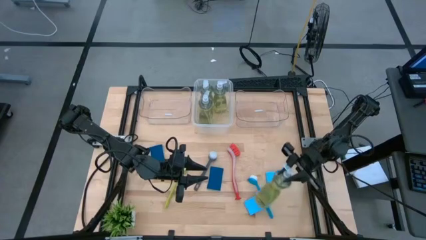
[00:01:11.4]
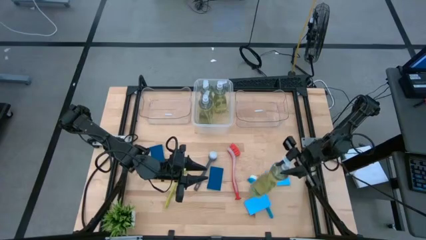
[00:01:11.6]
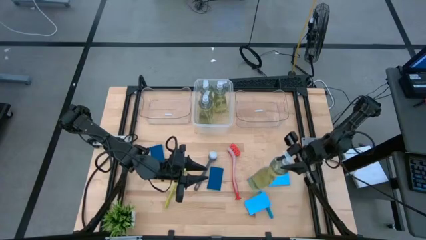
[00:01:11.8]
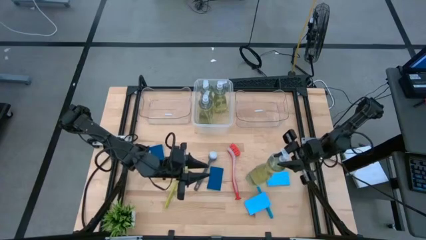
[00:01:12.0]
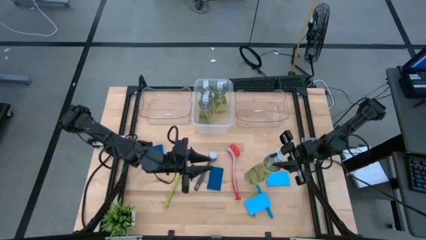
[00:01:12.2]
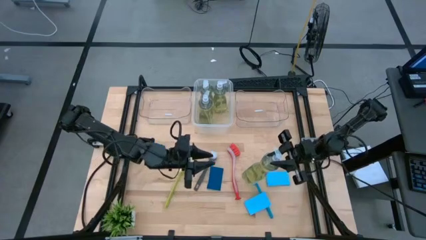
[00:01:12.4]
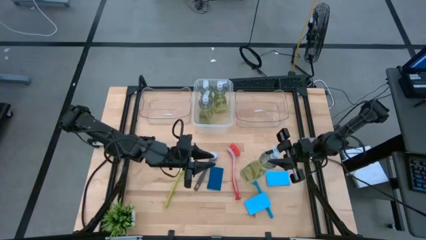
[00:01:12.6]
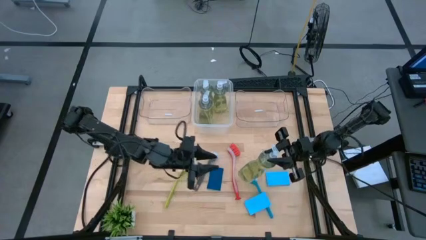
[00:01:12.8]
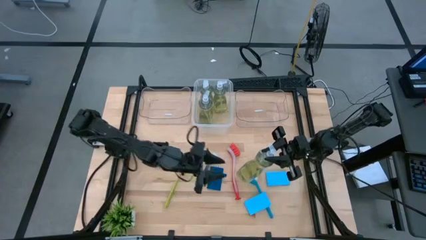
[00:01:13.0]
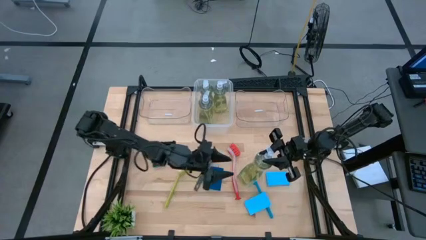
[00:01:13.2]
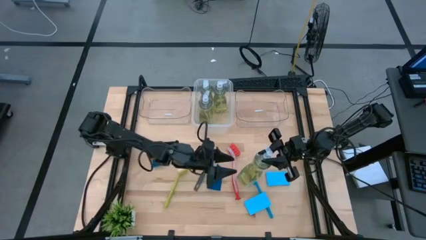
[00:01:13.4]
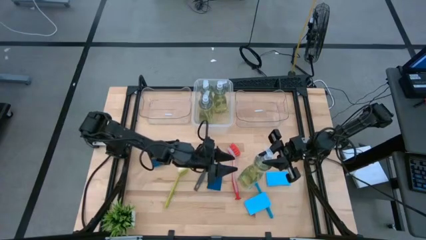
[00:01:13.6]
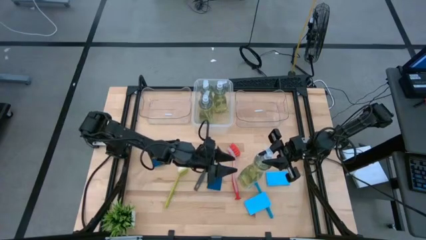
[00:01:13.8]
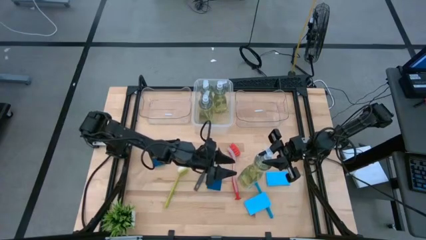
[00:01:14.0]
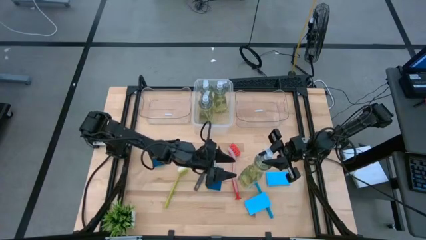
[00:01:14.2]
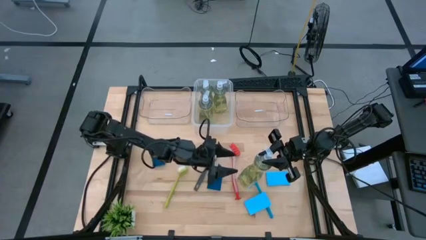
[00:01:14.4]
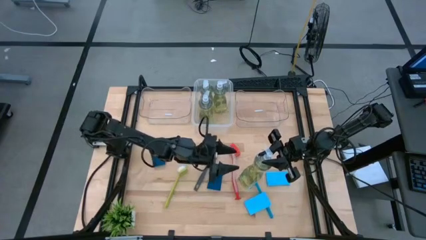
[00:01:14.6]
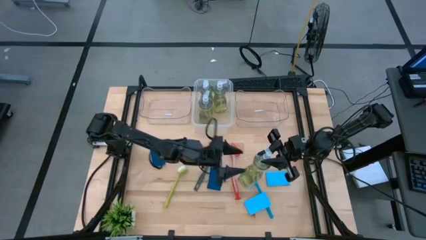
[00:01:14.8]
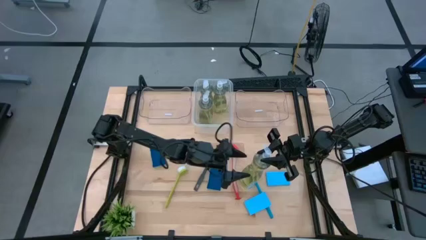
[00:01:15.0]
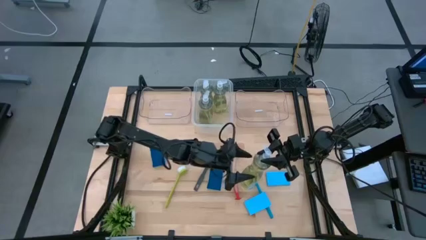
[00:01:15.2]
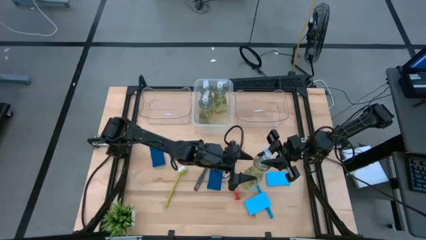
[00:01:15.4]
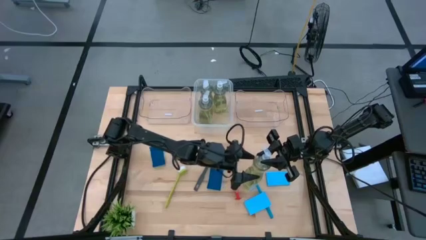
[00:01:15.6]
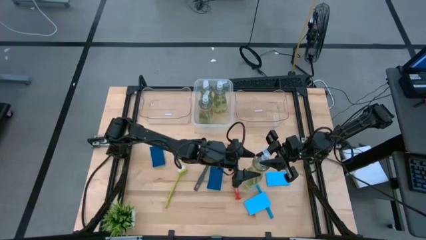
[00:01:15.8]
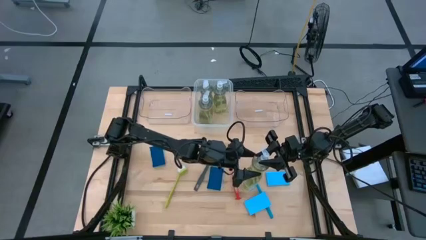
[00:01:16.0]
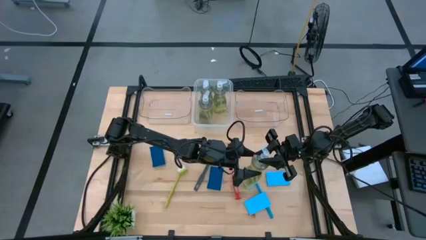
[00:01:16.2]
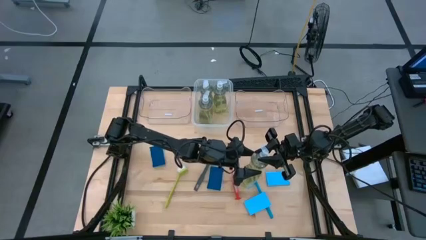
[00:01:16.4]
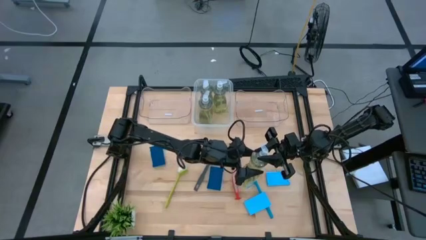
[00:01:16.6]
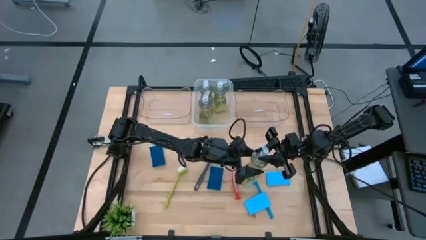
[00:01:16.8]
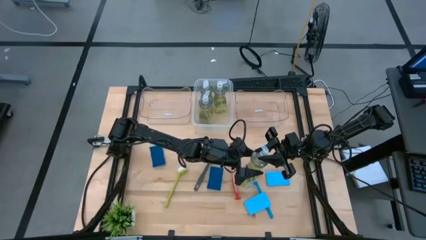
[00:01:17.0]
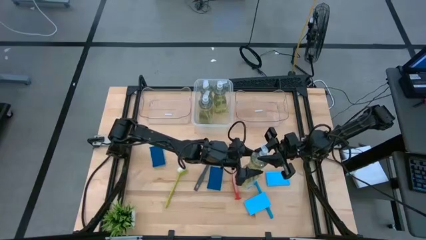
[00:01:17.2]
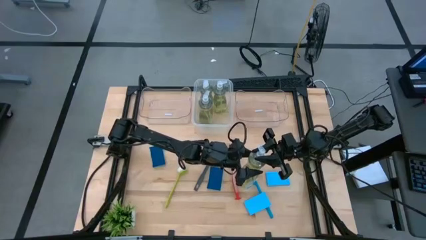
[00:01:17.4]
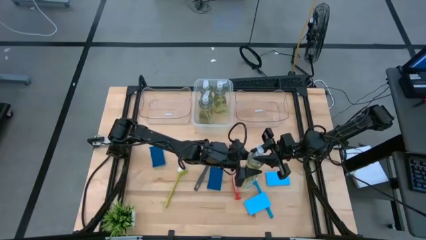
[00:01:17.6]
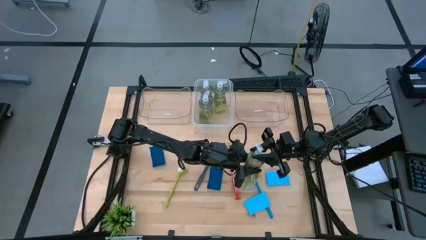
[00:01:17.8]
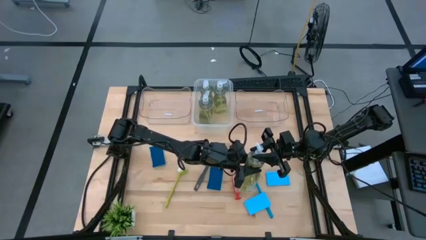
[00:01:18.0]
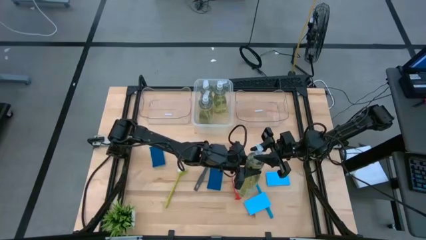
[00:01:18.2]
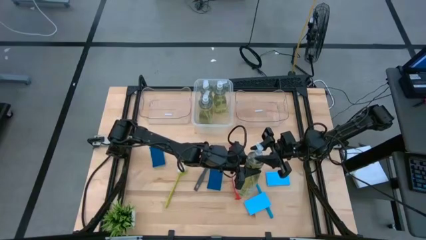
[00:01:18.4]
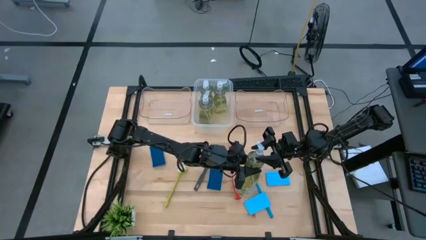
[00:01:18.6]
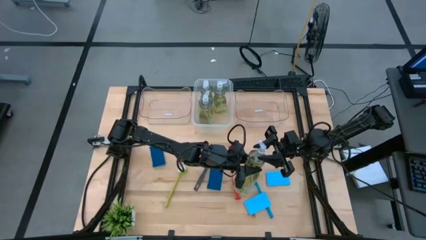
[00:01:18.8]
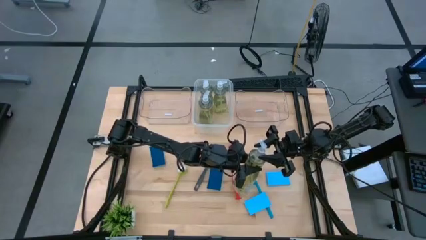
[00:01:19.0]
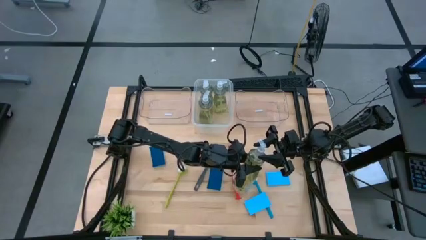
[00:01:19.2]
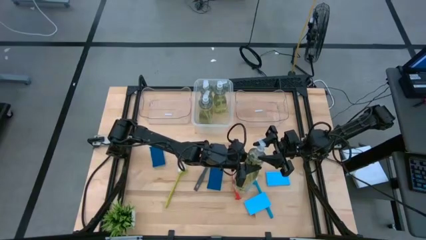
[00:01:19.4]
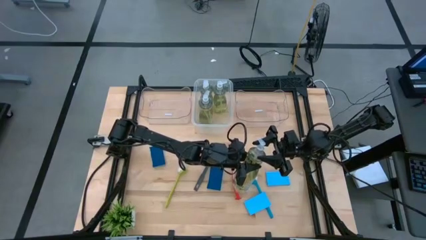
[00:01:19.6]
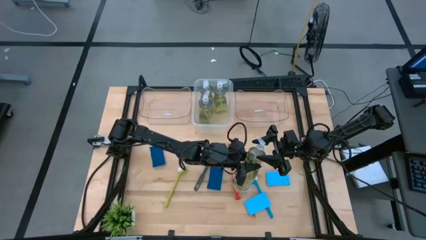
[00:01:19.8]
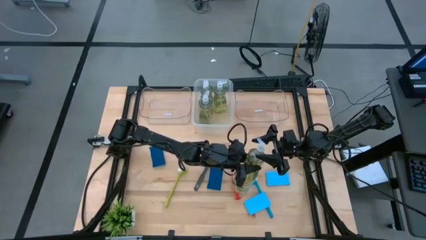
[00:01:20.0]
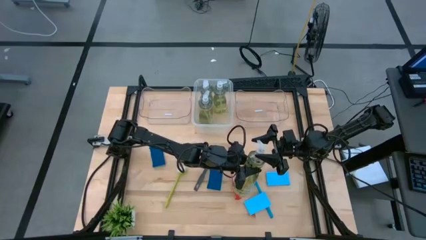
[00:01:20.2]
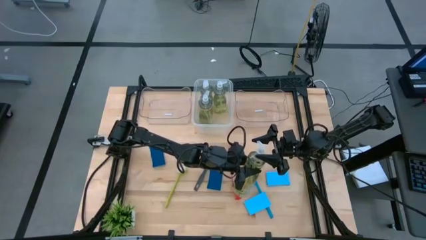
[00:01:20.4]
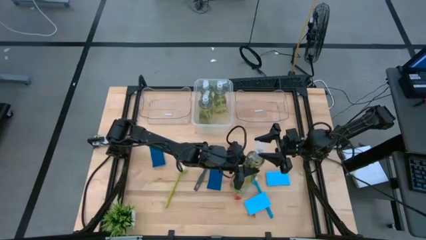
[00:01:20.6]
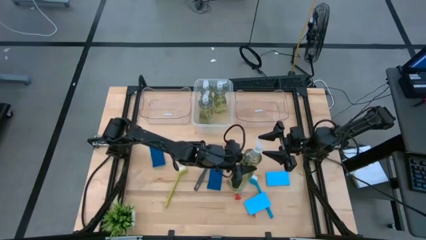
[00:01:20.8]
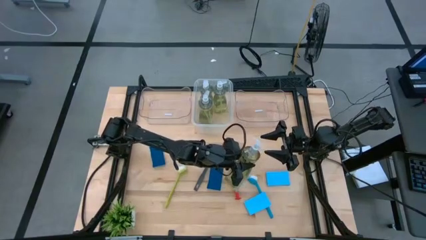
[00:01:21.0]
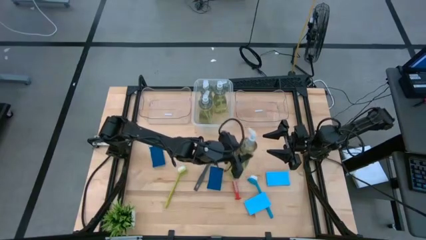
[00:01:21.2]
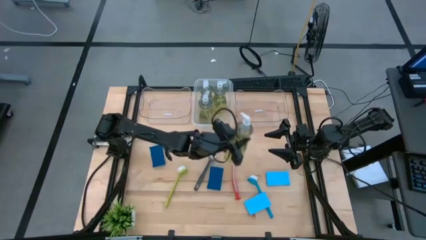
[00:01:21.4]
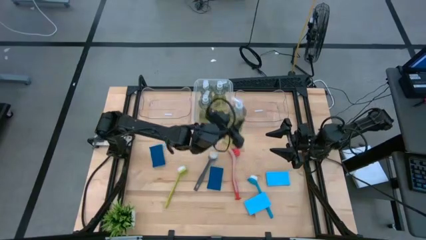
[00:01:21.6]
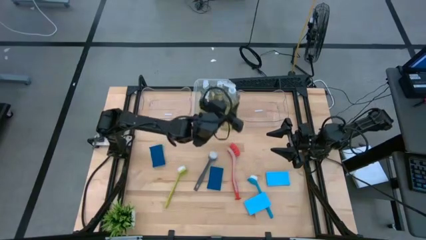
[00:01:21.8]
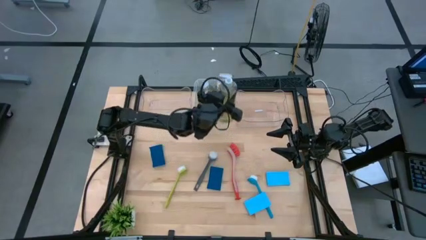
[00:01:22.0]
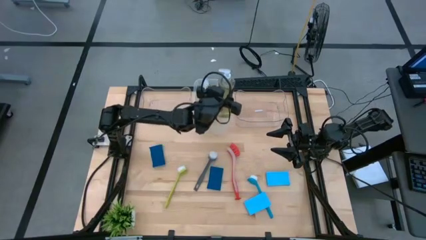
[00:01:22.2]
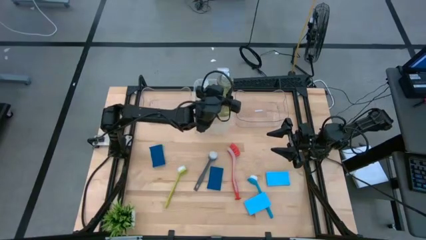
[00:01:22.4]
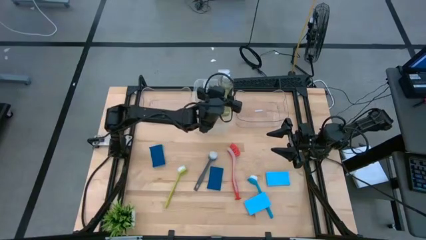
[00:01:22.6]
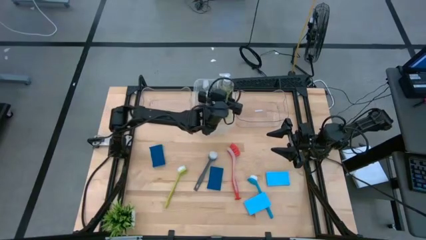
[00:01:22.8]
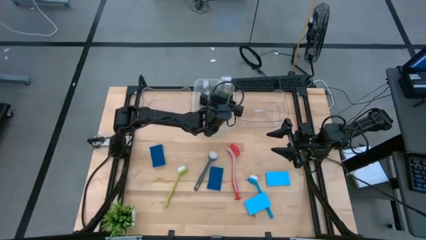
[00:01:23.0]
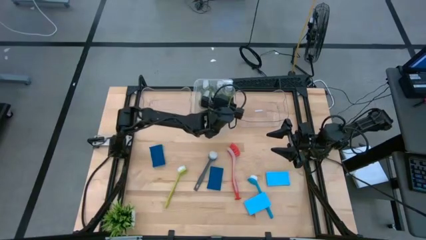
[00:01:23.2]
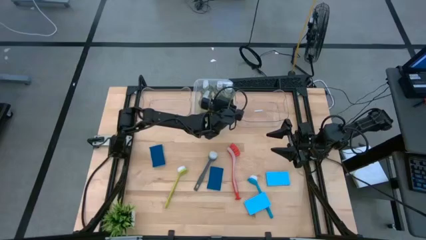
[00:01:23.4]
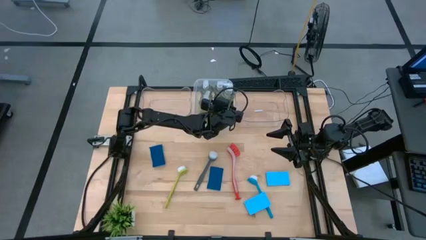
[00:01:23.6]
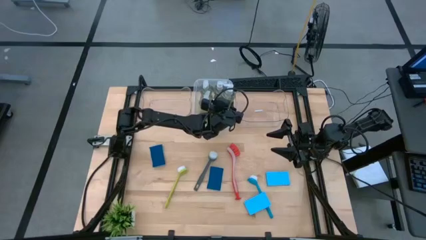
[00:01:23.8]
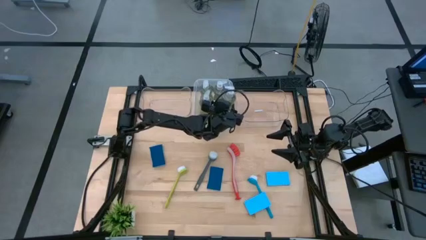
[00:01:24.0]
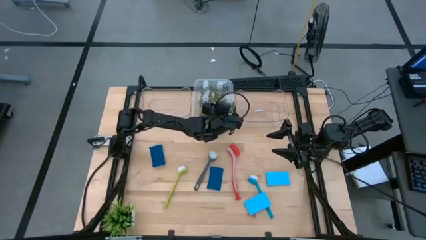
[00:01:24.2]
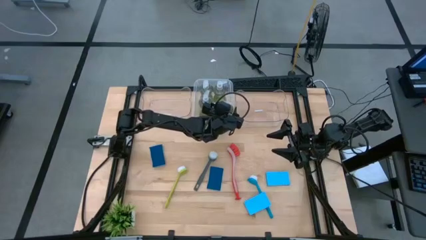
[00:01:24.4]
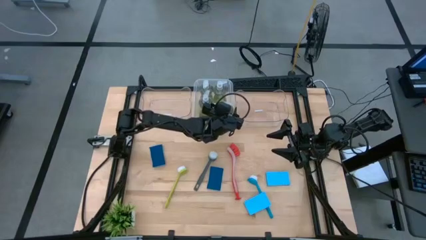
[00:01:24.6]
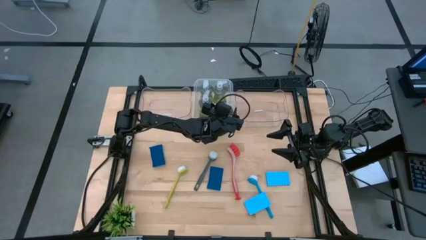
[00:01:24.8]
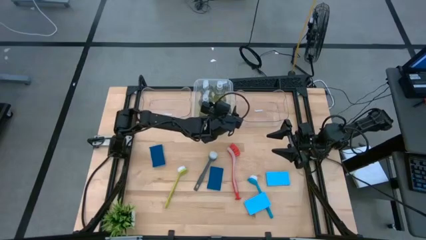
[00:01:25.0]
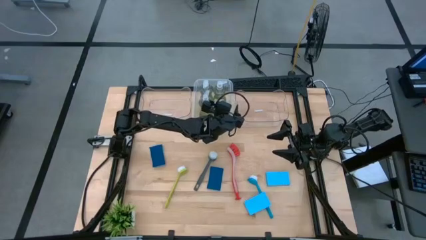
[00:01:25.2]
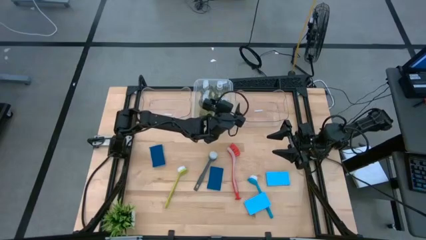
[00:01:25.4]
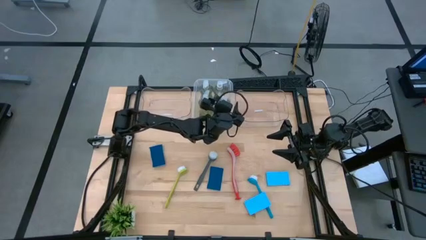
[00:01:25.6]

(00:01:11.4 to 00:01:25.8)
Task: Pick & Place Kitchen Sink Supplies
Put the green soap dispenser into the white transparent bin

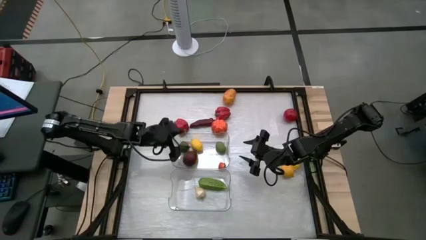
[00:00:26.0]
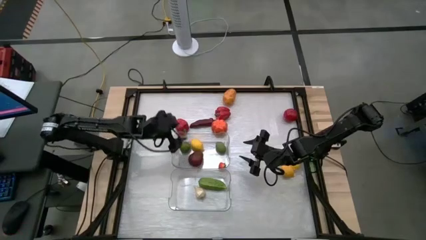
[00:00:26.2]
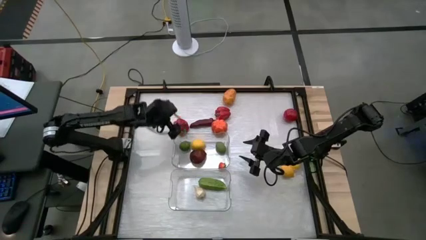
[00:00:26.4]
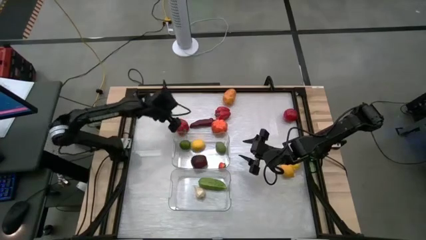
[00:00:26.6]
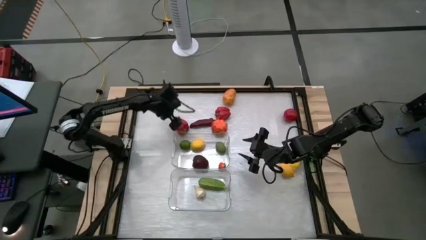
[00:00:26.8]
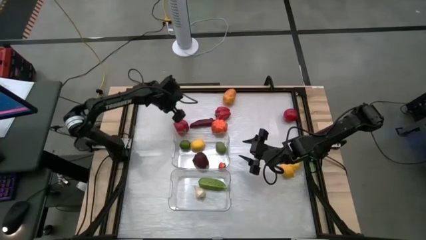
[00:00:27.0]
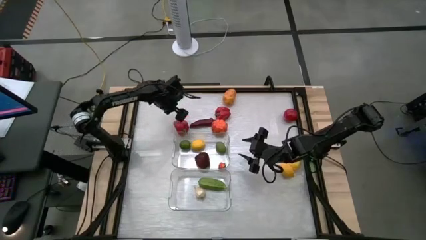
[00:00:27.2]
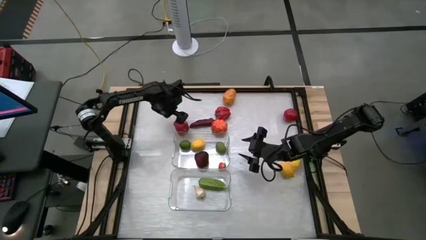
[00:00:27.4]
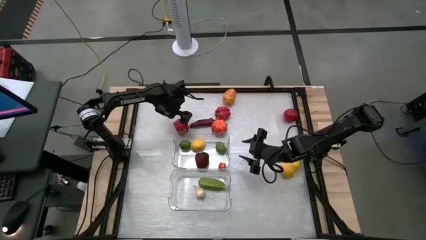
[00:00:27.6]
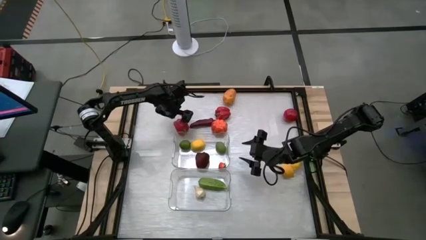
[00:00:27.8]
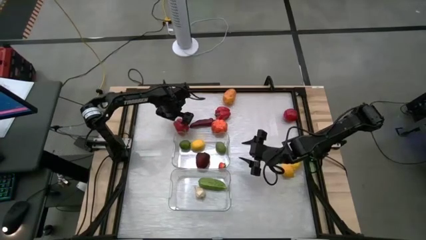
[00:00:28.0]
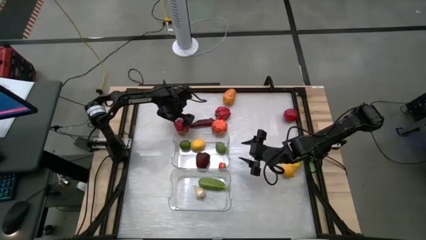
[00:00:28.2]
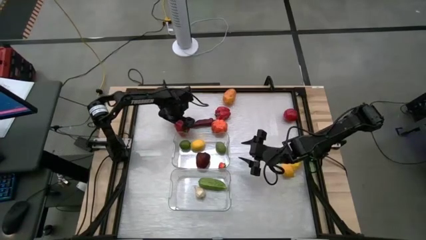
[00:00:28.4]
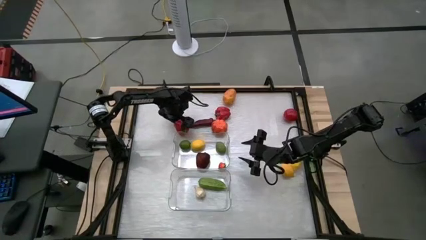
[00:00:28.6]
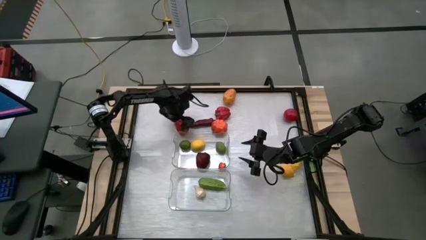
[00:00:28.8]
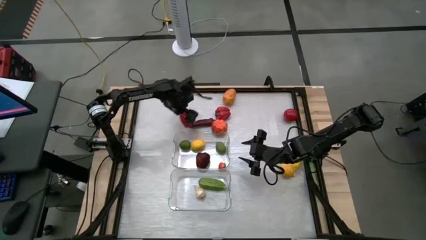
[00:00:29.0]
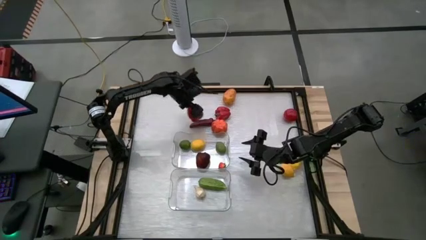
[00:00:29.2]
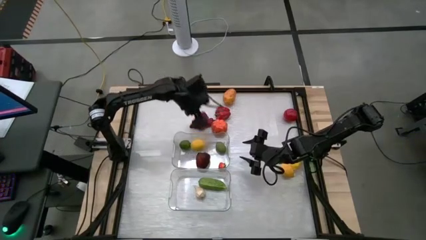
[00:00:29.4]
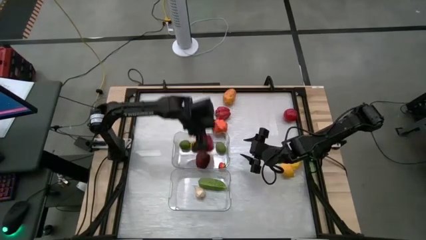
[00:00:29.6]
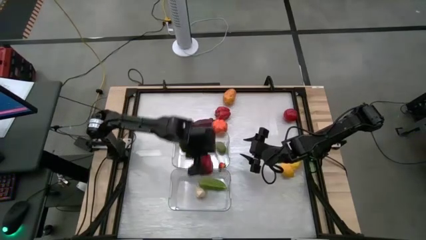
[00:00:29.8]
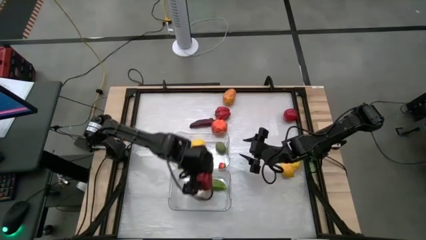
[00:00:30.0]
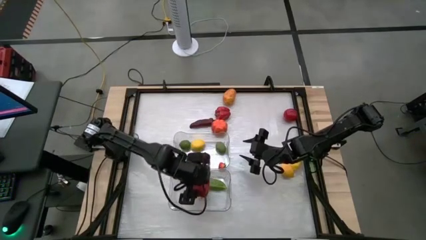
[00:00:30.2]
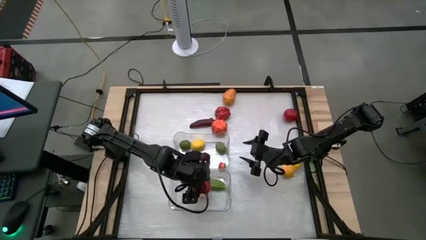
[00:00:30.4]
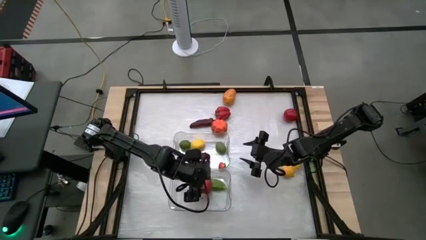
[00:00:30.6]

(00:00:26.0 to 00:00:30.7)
Task: Sort produce into baskets
Put the red chilli pepper into the bottom transparent bin
